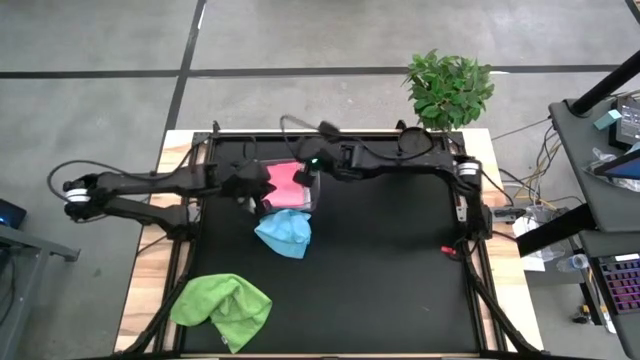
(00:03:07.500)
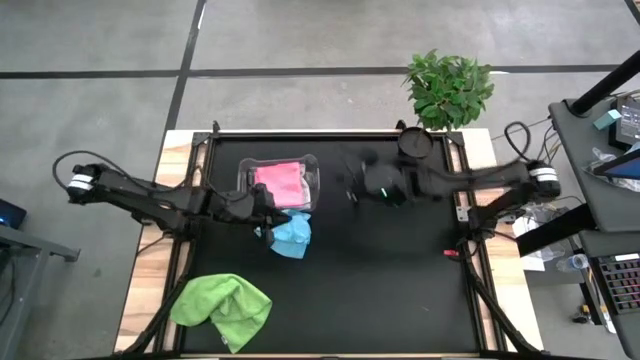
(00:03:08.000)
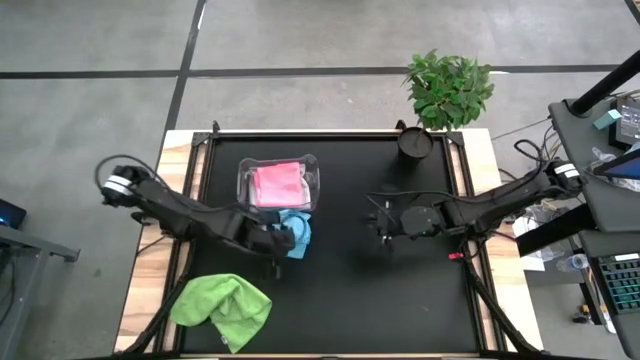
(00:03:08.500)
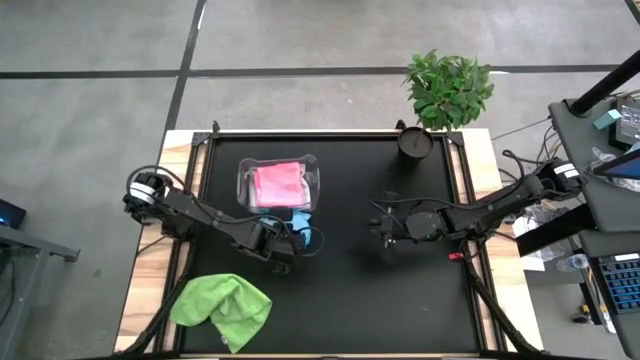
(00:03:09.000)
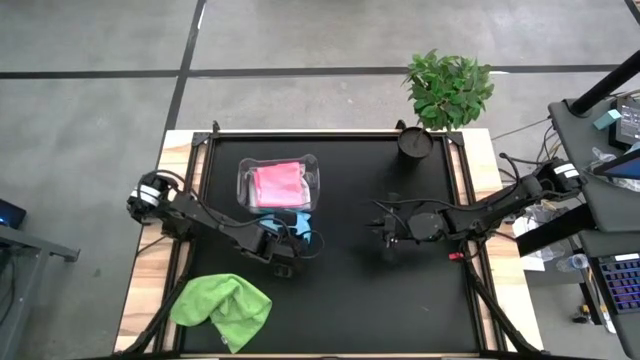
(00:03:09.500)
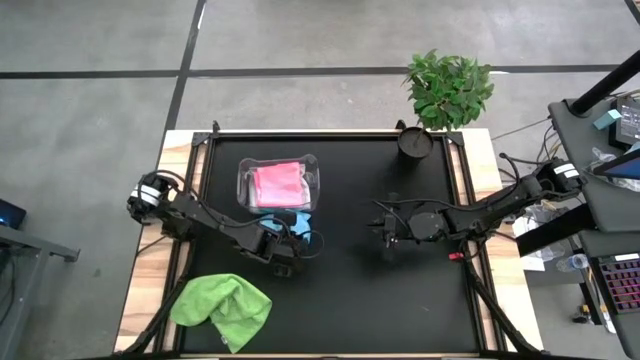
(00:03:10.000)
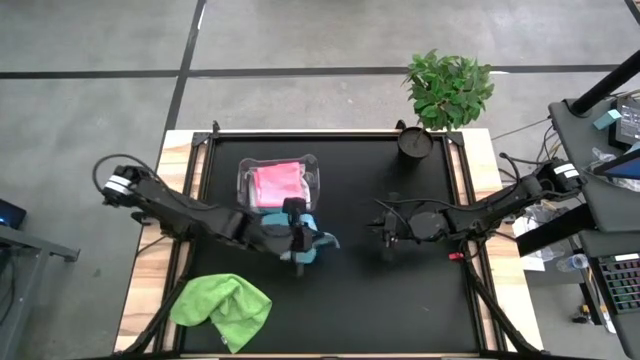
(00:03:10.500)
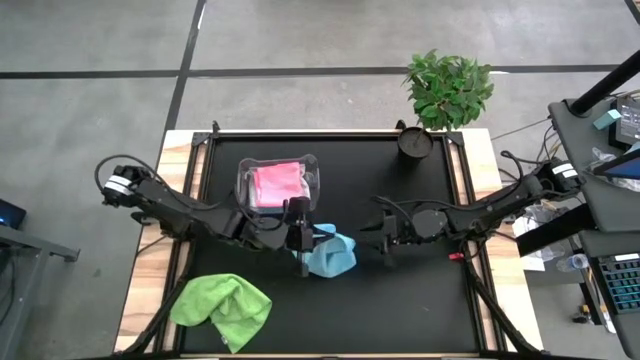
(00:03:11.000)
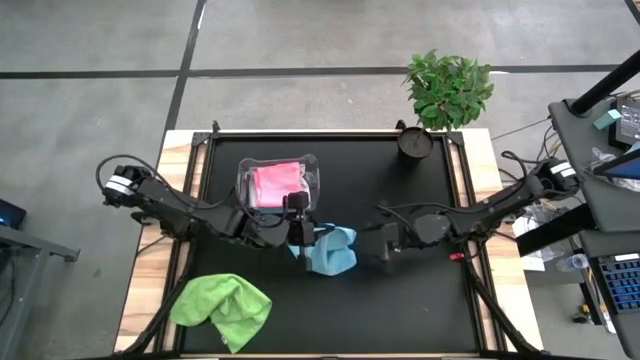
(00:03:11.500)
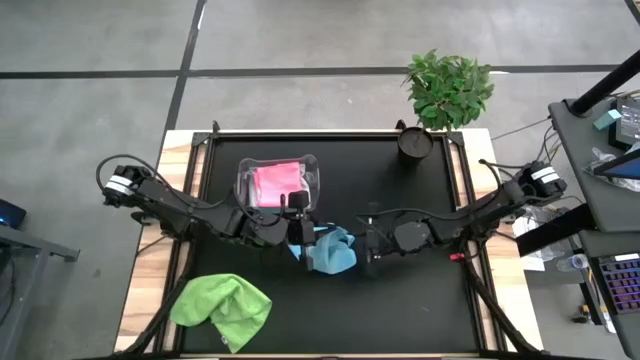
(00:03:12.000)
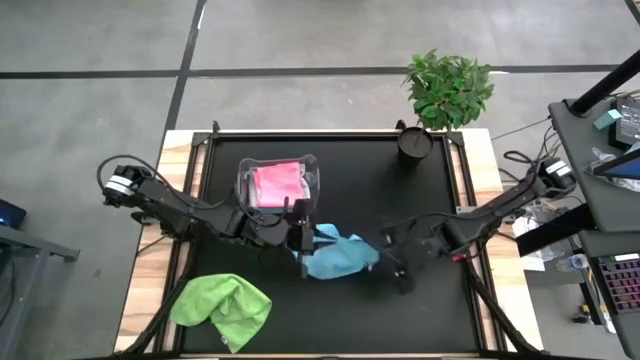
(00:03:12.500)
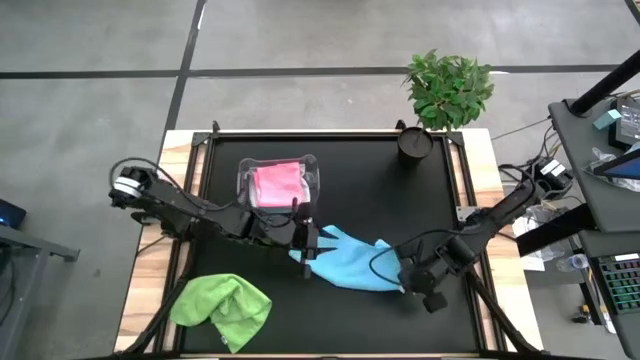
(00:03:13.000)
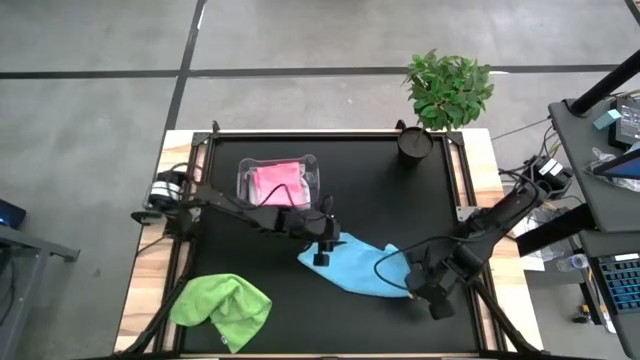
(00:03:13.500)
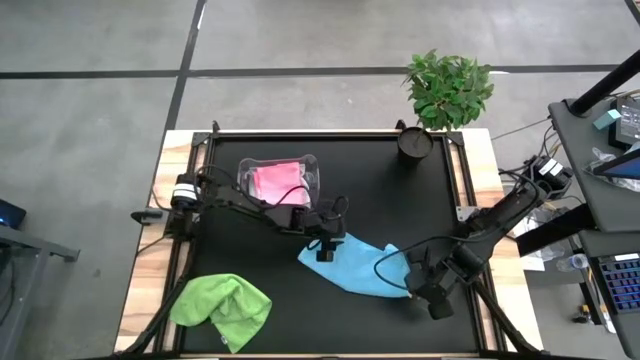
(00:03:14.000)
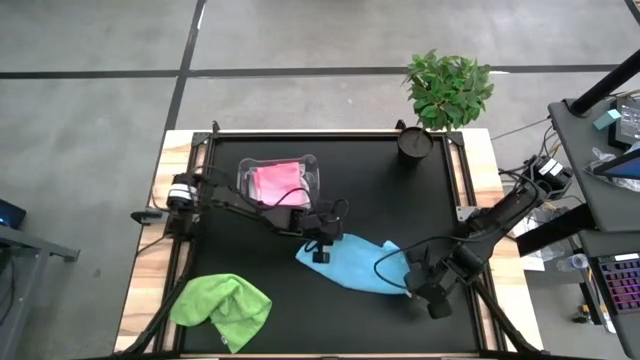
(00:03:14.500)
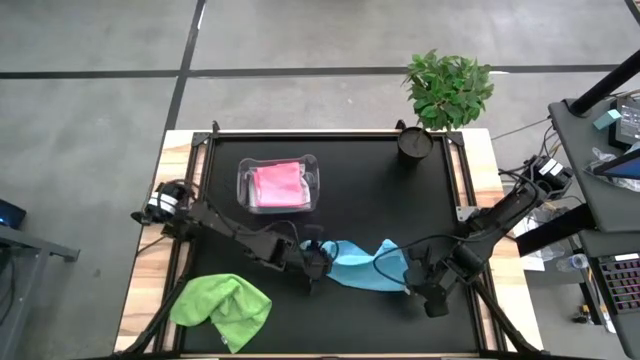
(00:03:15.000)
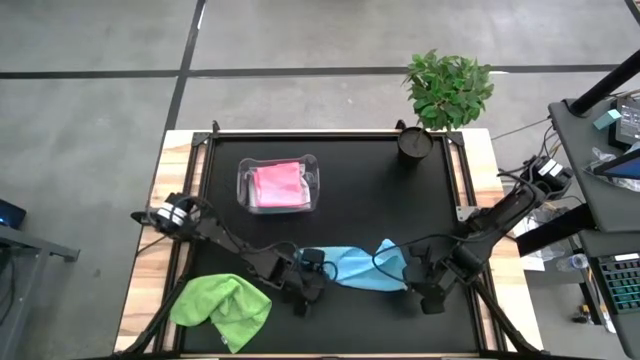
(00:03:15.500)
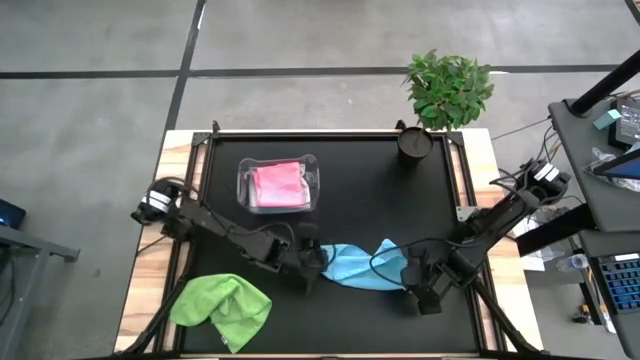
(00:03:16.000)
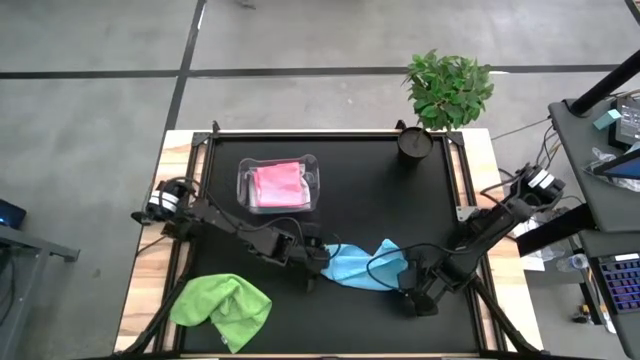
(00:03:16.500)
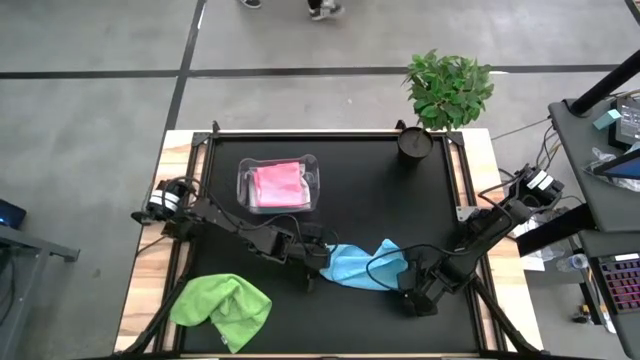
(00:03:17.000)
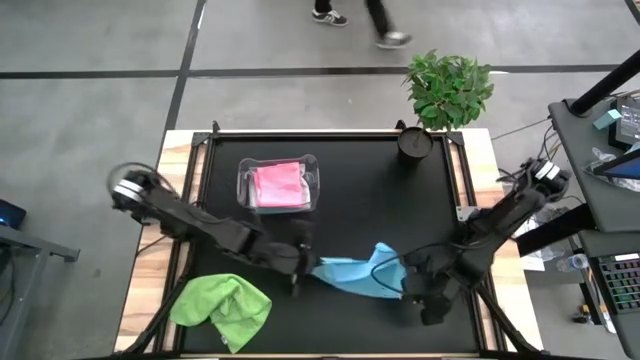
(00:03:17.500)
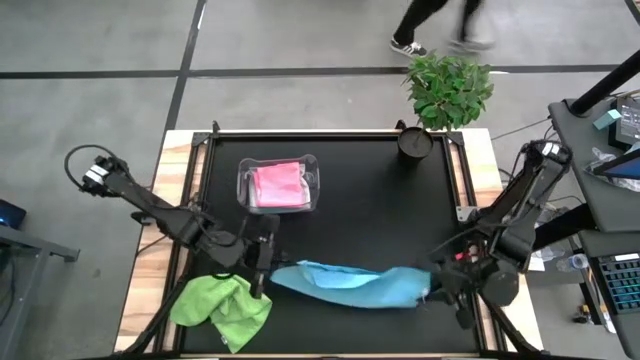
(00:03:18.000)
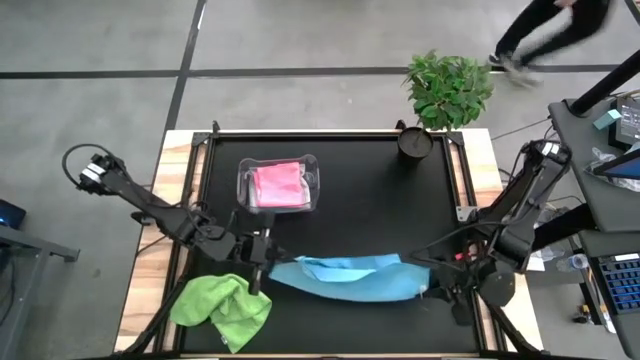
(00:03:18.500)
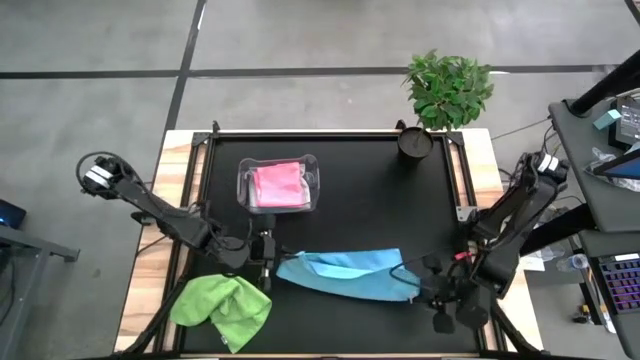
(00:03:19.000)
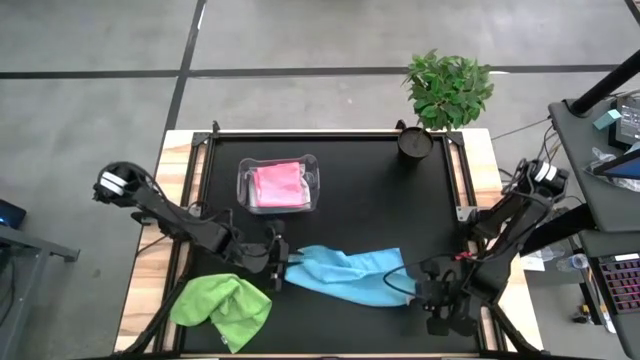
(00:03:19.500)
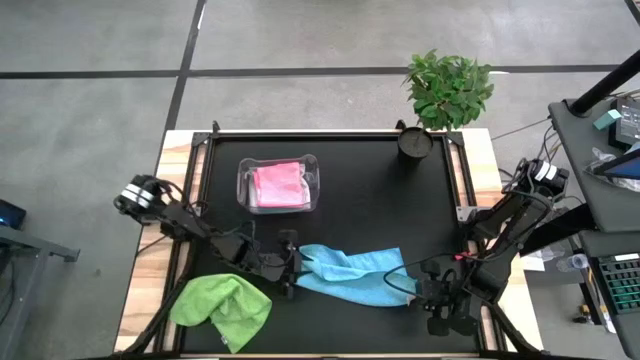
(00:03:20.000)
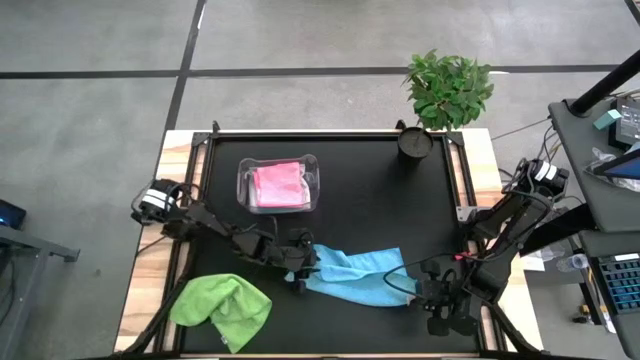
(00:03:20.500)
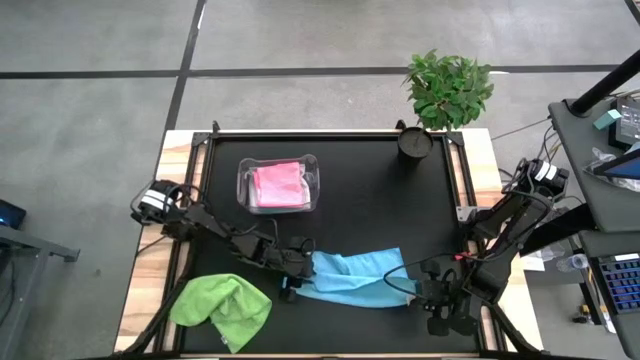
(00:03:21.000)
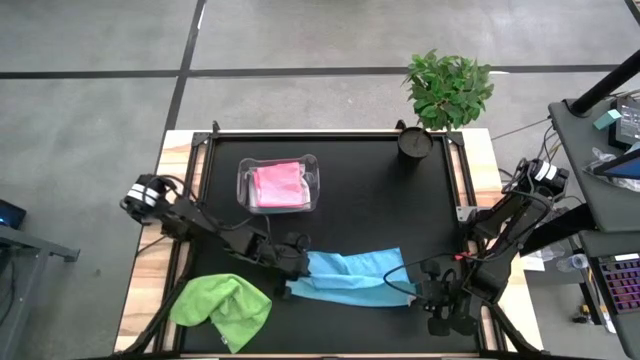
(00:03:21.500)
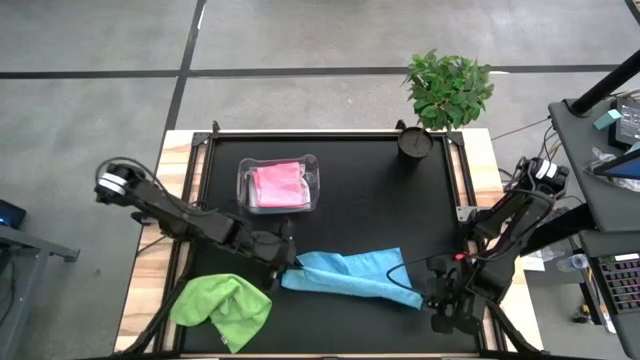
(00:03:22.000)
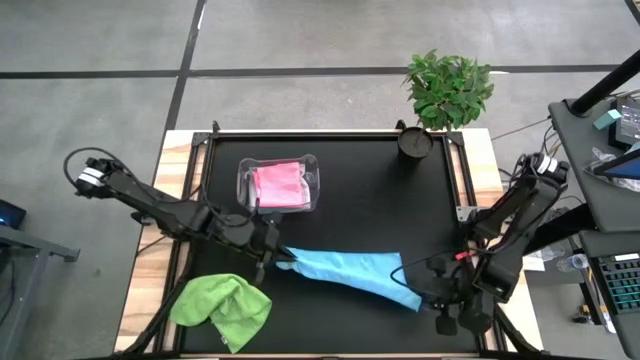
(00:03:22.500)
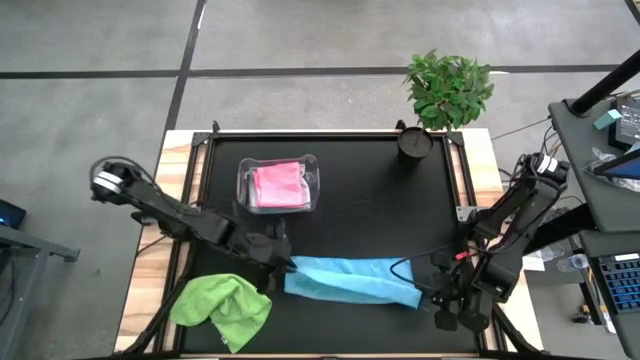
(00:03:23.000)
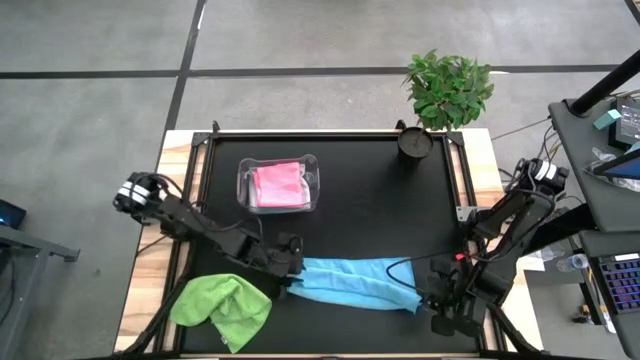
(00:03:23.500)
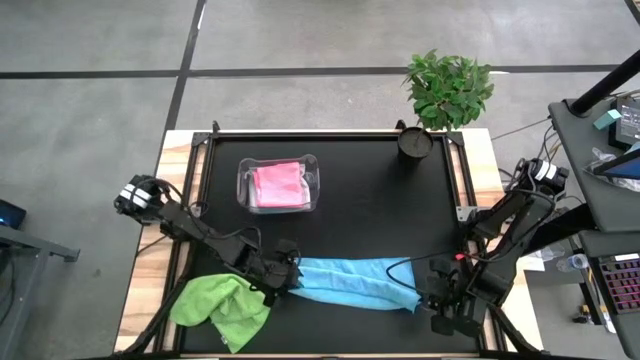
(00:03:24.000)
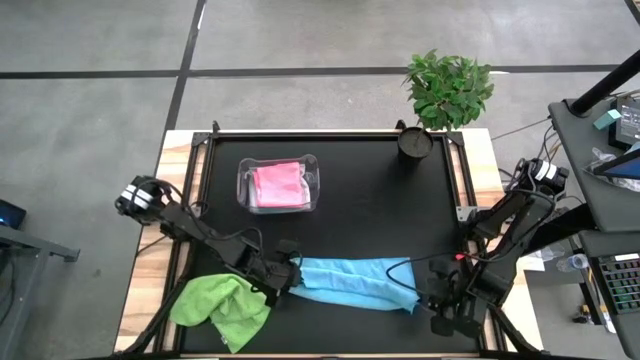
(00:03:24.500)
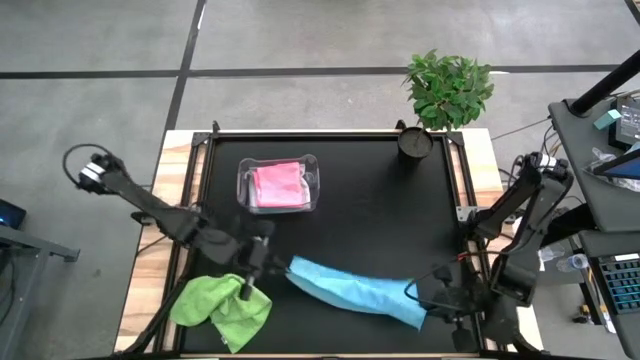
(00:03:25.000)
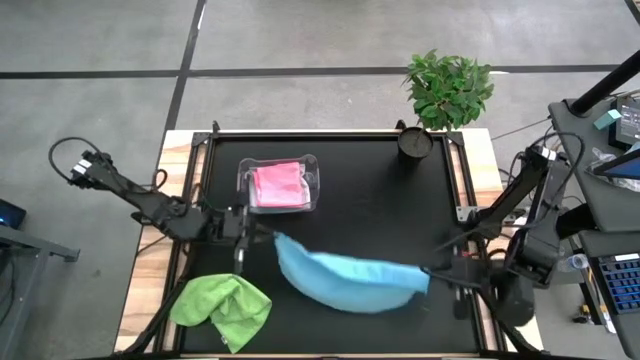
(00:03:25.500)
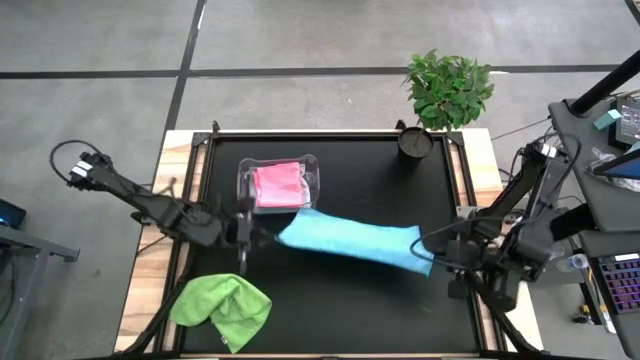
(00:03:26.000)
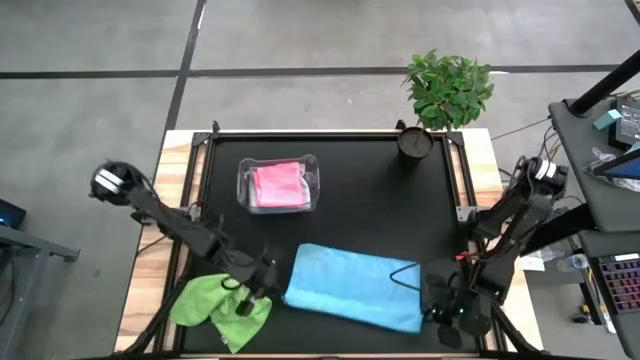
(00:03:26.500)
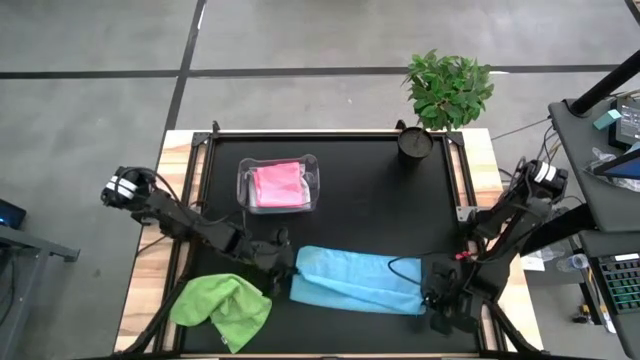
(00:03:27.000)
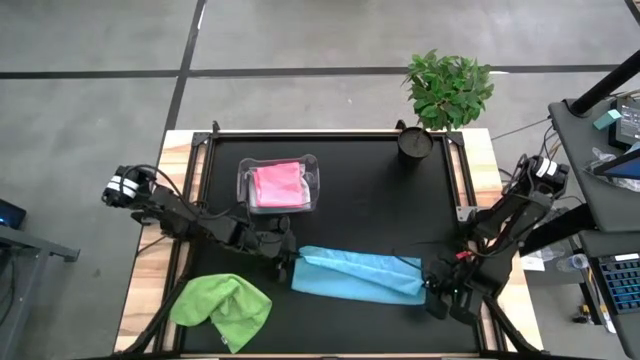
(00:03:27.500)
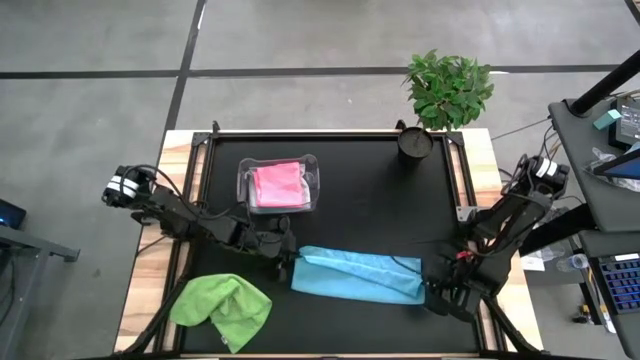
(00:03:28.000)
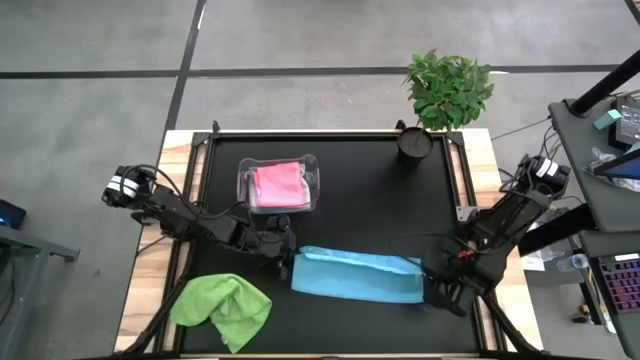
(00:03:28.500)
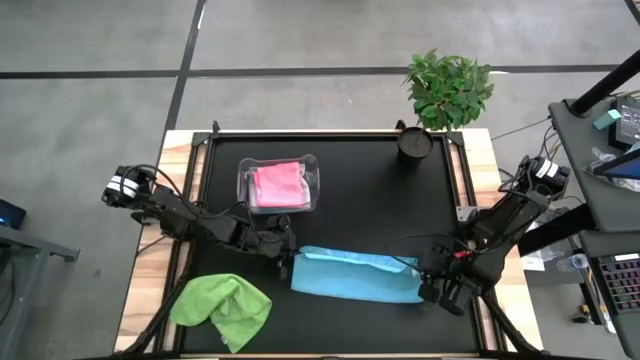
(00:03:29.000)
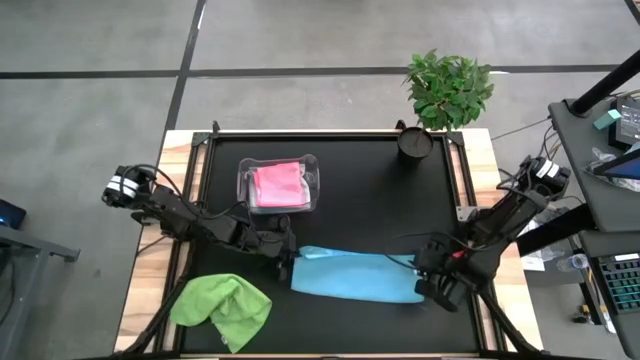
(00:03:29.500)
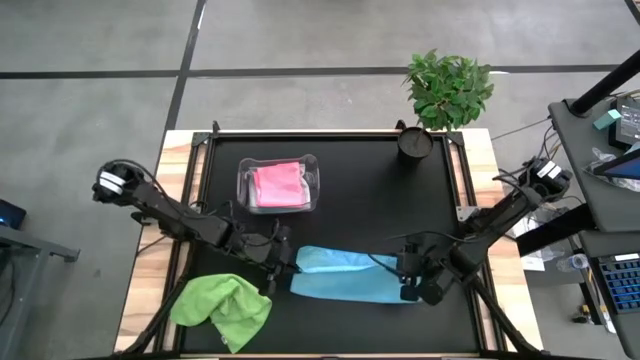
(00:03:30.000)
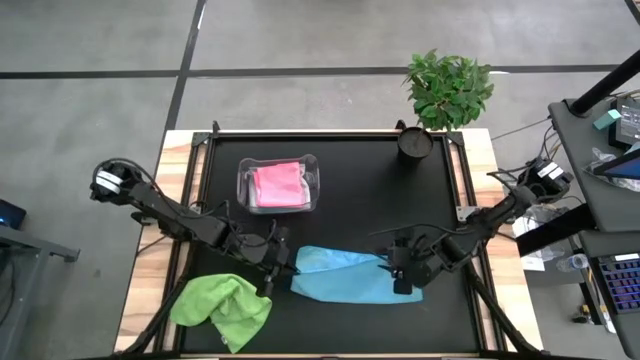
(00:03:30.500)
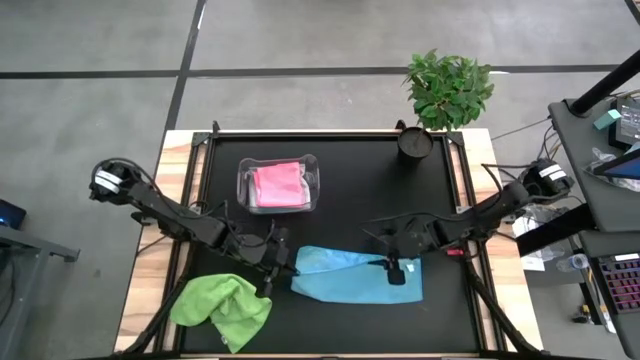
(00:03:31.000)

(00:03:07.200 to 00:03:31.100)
Task: Fold microfiber towels
Fold the blue microfiber cloth
